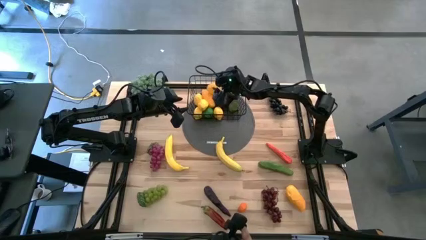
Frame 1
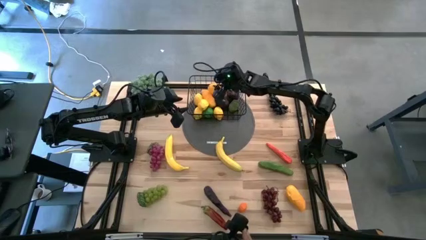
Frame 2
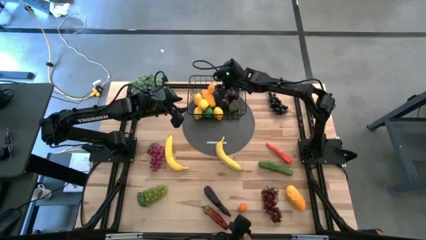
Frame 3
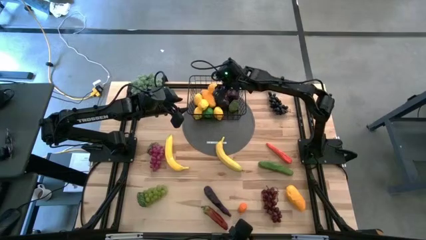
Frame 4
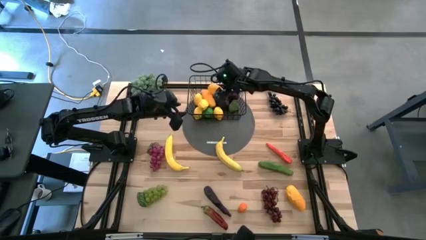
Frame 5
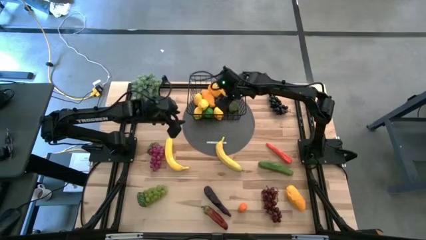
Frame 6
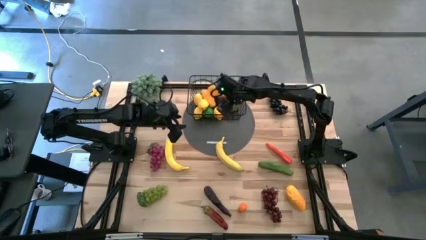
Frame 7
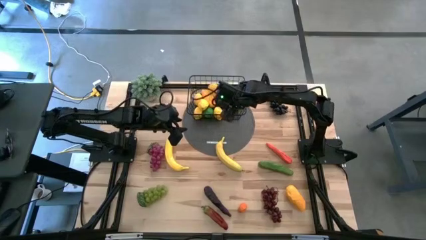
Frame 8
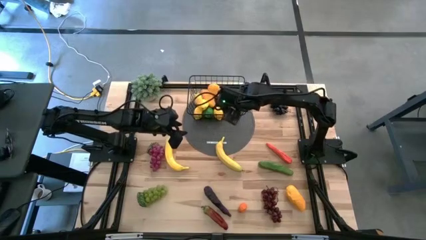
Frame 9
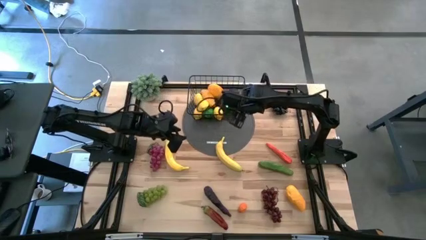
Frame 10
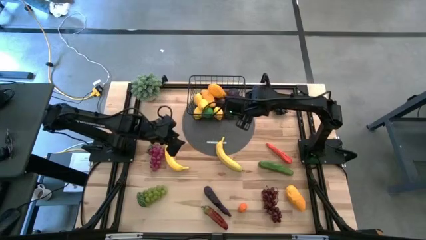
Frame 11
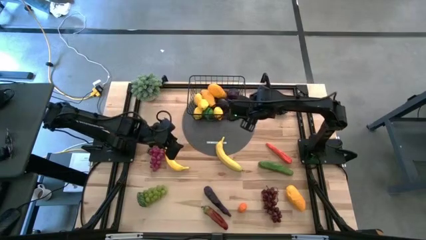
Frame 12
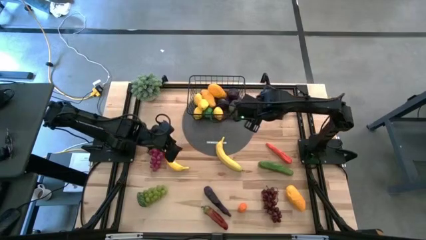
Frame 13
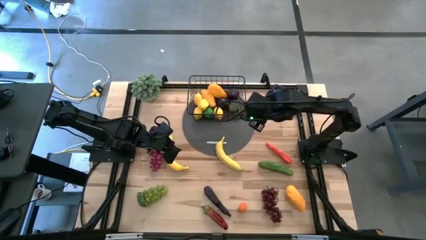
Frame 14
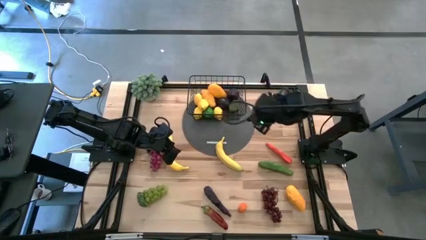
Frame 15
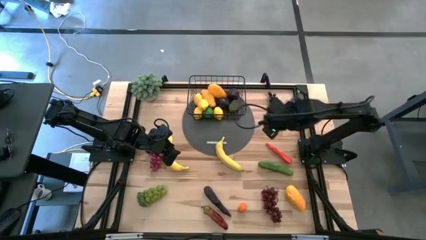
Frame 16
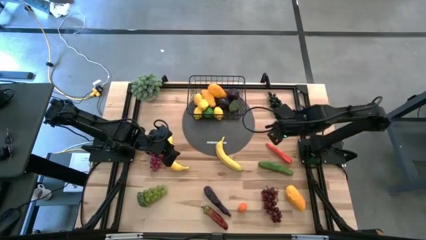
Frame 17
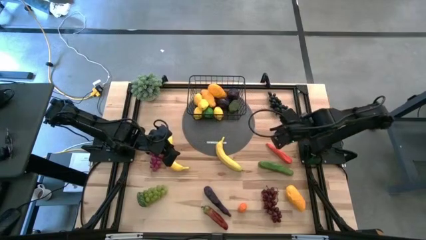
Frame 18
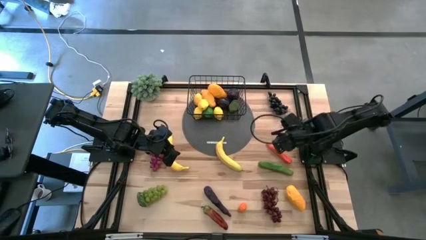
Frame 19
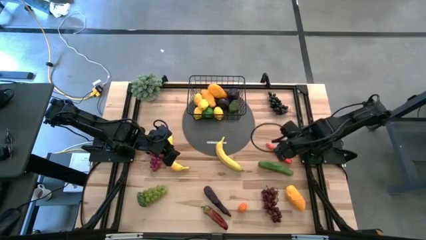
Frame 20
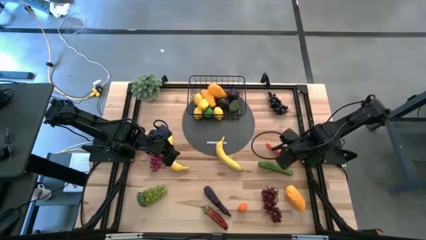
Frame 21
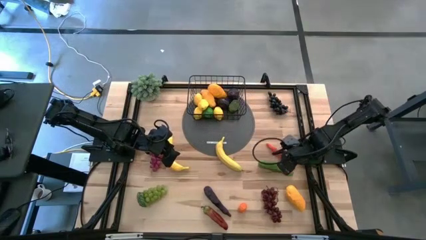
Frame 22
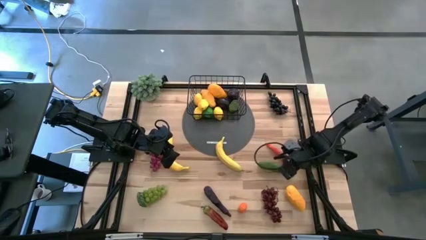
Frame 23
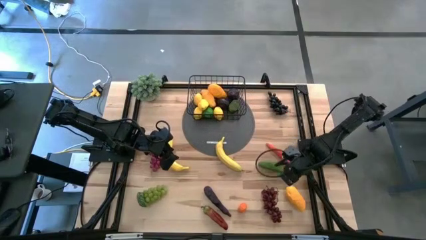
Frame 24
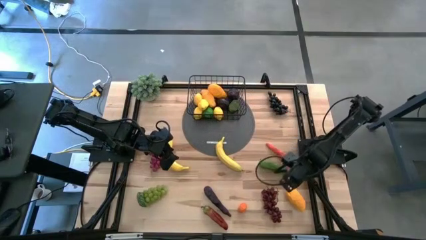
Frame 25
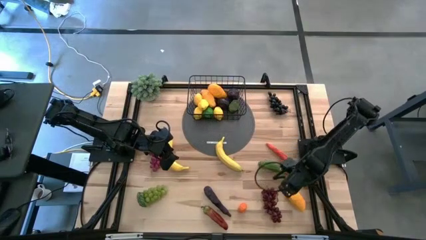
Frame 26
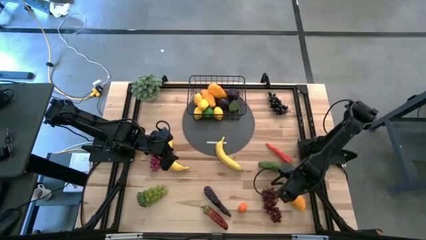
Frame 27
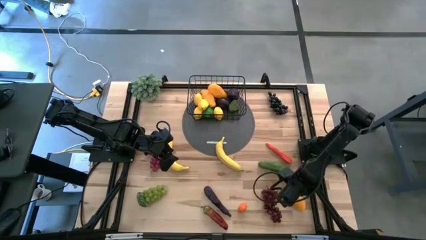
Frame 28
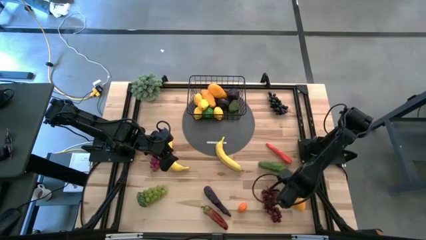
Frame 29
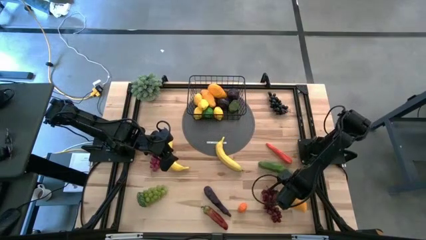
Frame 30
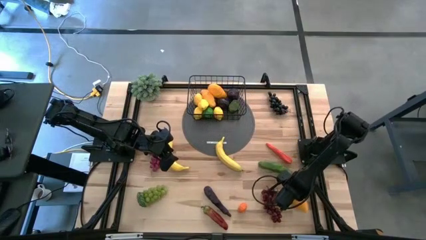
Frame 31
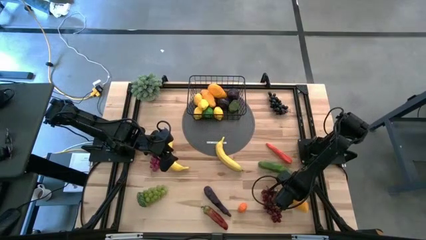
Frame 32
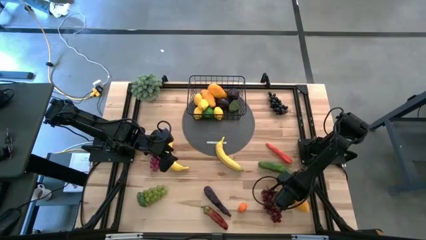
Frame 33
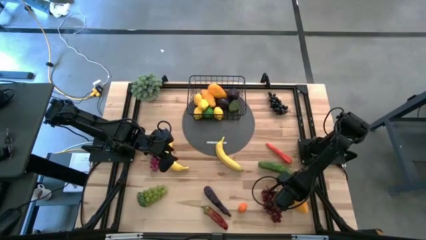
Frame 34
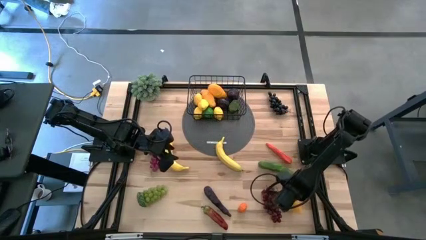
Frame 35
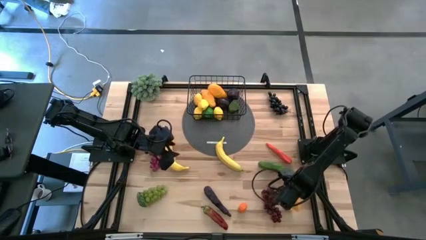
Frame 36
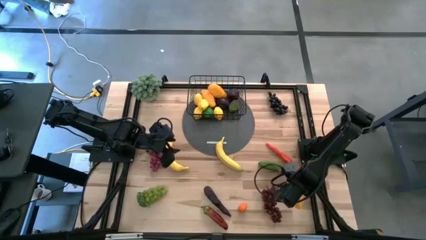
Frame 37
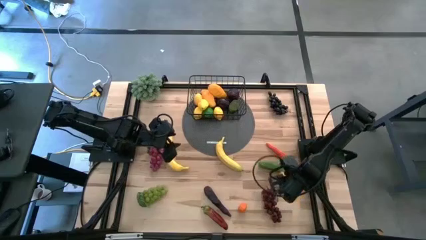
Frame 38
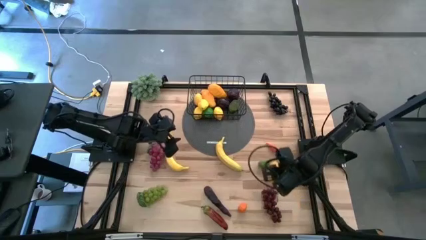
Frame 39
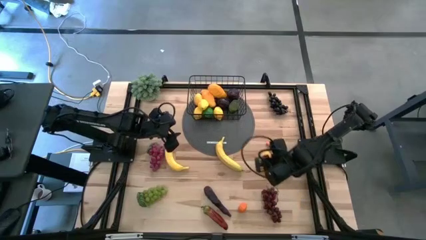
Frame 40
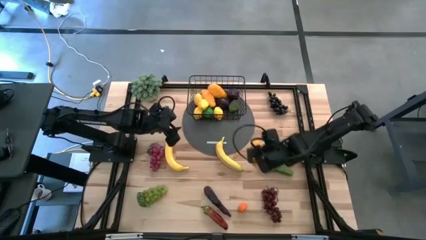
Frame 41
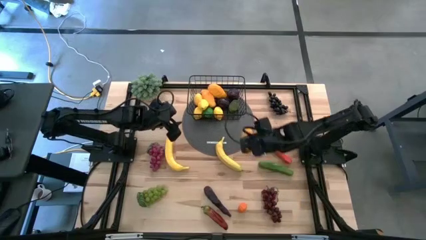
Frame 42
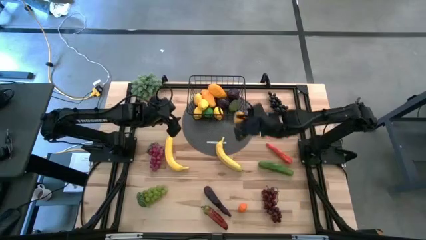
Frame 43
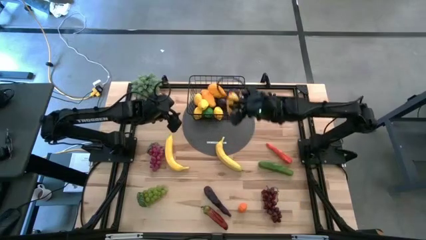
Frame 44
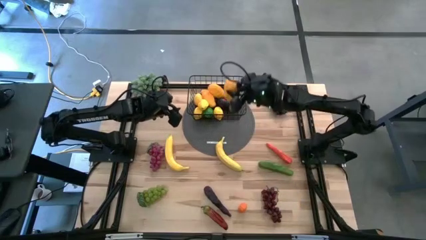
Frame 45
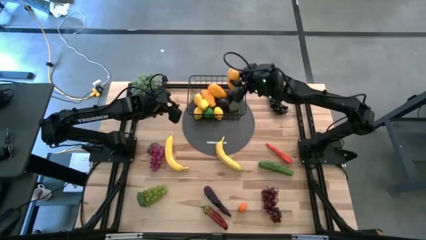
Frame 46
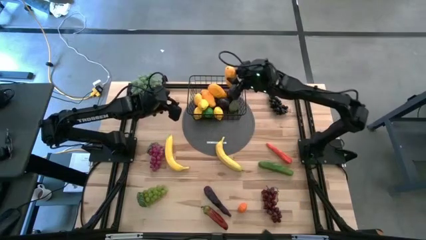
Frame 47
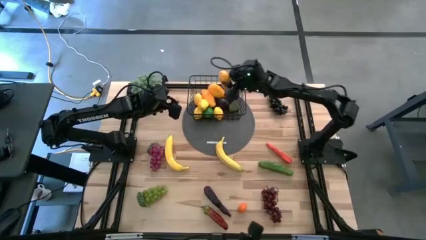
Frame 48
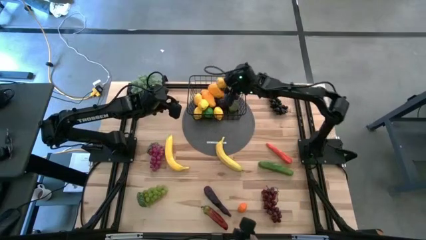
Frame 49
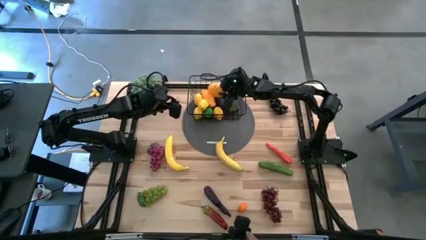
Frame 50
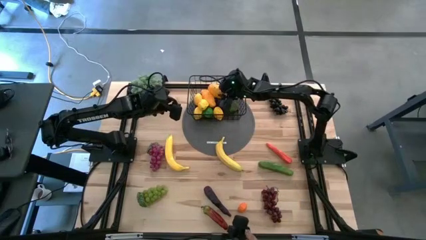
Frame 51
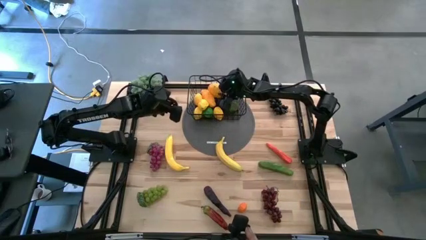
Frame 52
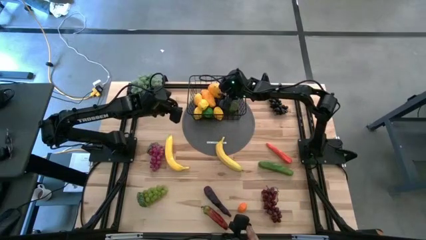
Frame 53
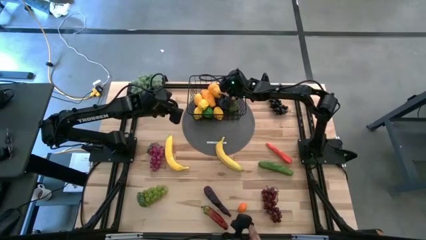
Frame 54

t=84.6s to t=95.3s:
Task: Build produce basket
Put the yellow mango into the black wire basket

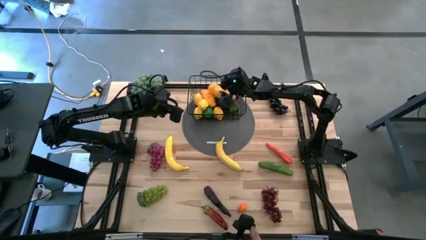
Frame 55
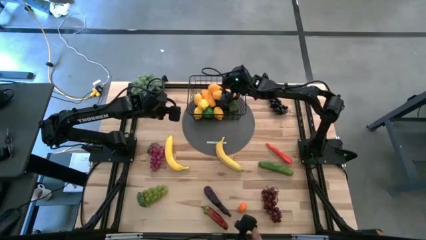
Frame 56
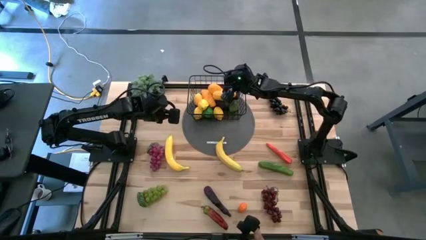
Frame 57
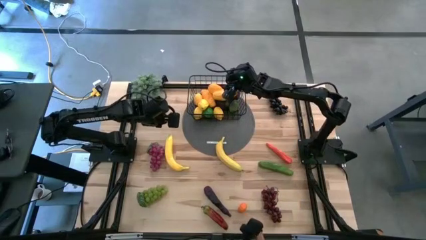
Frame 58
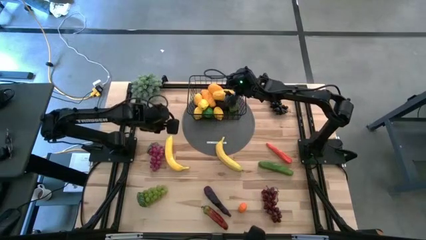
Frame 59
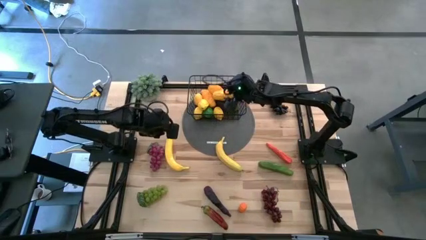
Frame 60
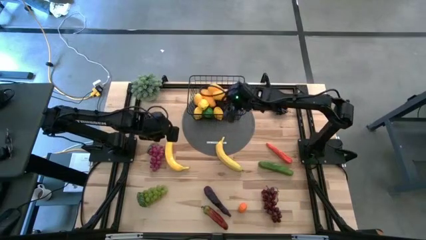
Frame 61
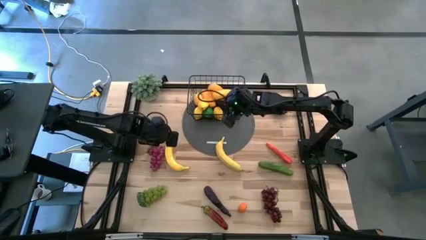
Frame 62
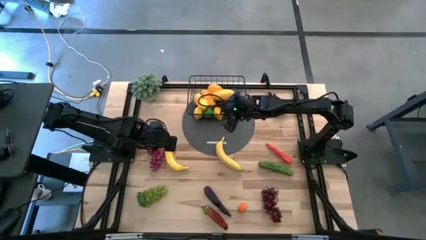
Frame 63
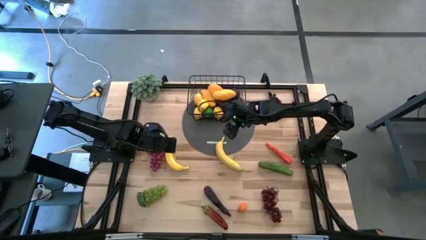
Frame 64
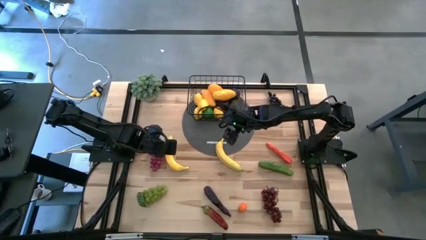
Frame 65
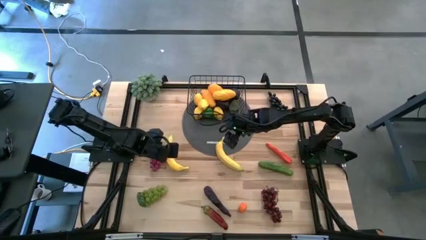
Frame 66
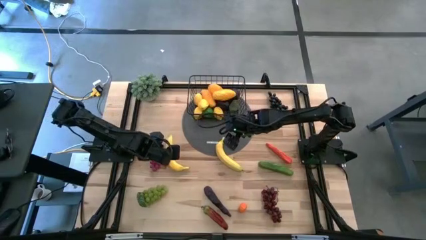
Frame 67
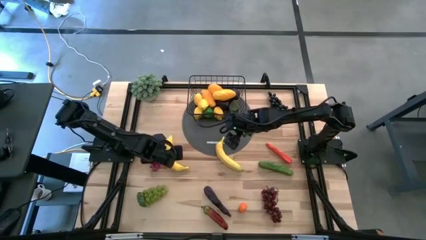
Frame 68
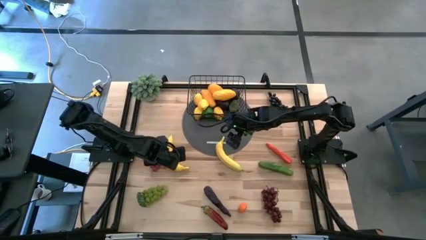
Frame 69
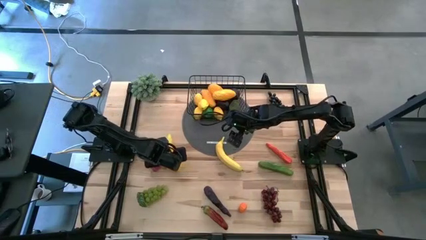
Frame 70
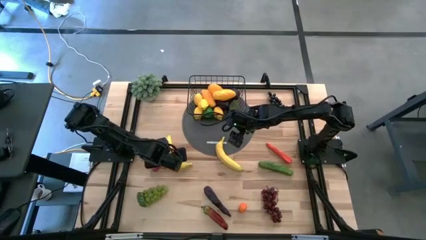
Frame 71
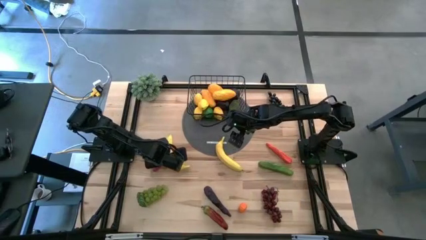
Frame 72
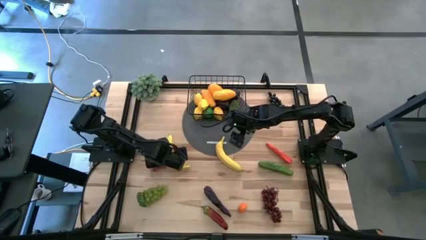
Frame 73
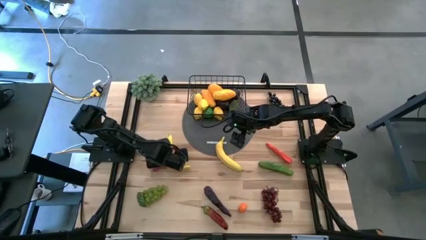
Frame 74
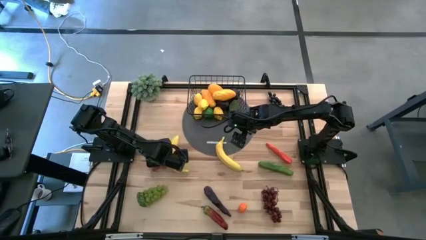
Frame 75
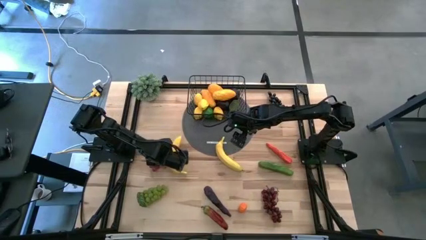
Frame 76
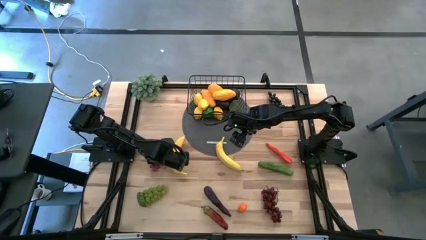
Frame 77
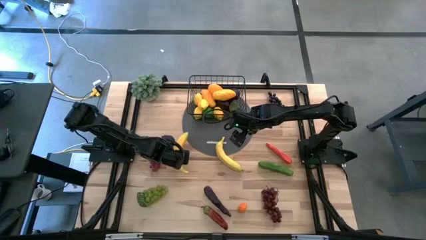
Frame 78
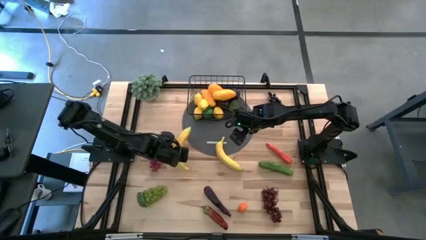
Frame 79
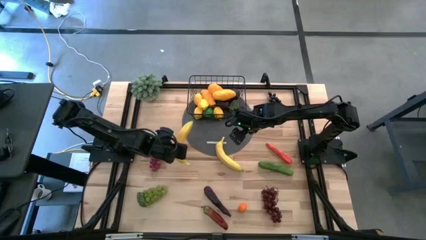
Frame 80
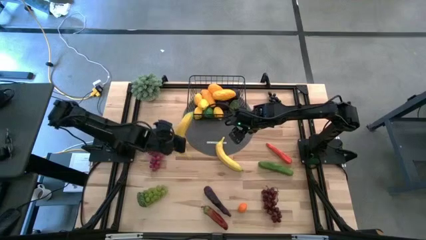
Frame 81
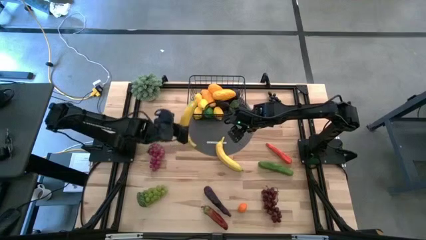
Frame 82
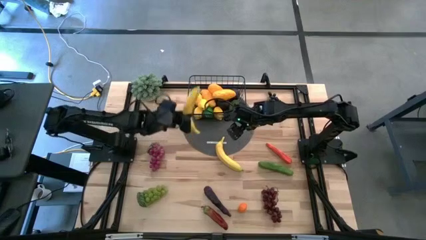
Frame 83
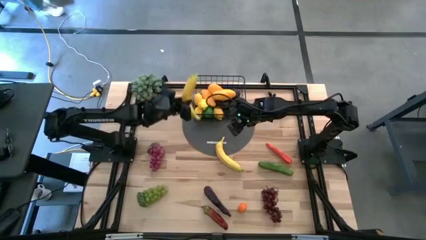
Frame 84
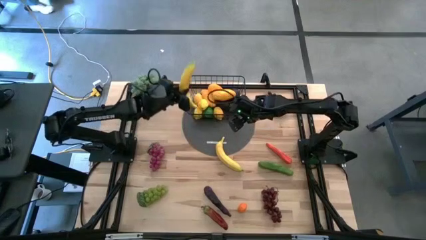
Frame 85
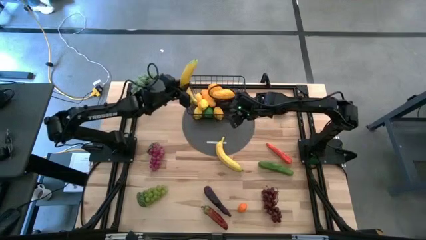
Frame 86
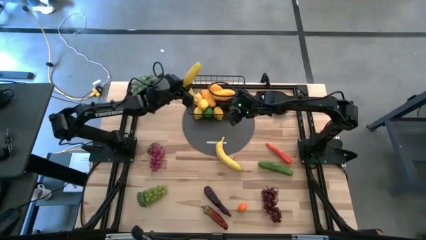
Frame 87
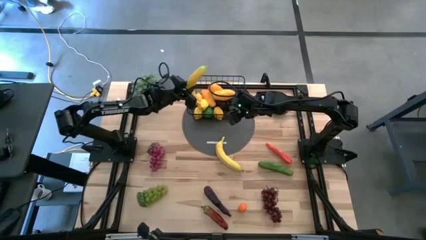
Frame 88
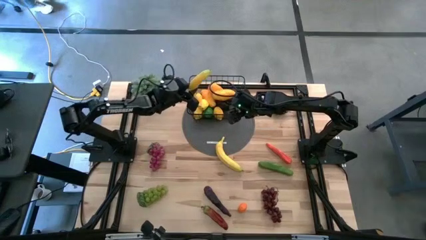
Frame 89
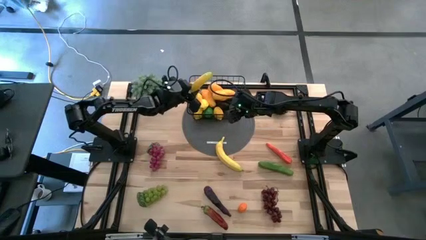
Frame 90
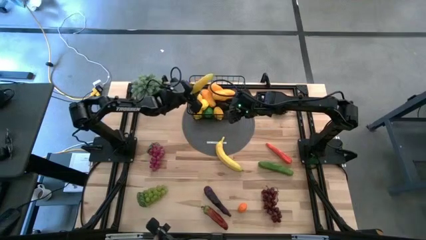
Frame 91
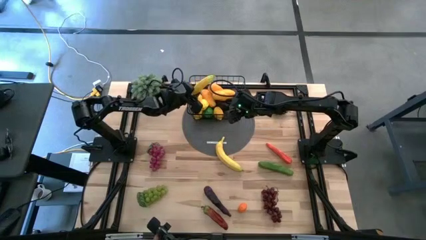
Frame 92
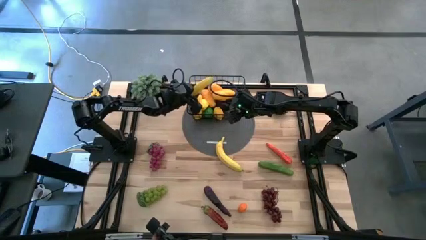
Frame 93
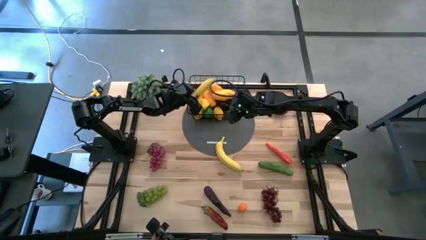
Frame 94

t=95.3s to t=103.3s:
Put the yellow banana into the black wire basket
